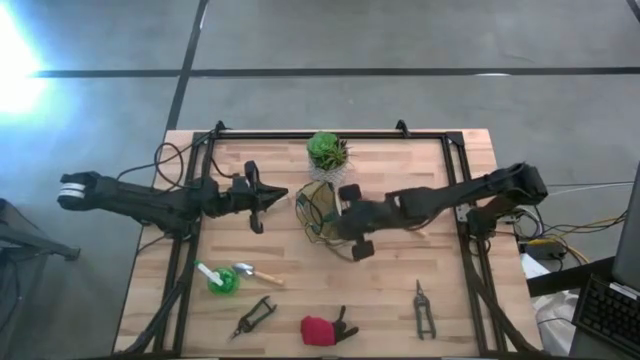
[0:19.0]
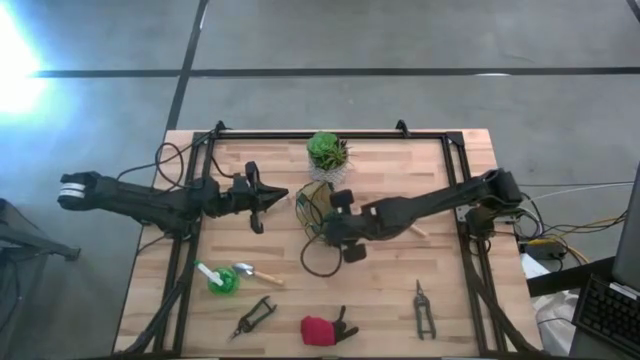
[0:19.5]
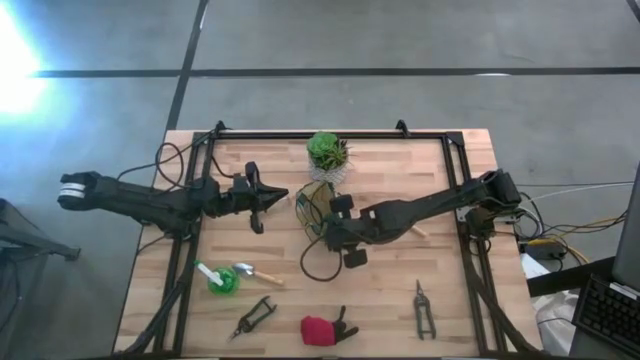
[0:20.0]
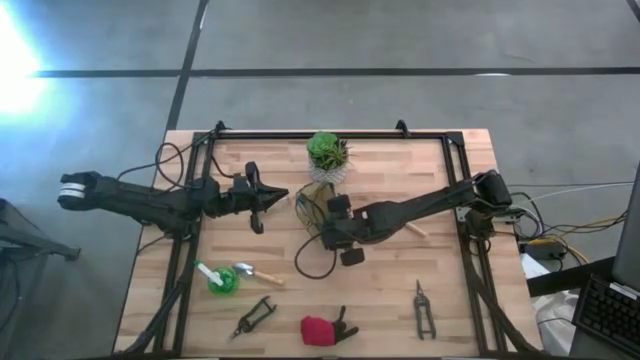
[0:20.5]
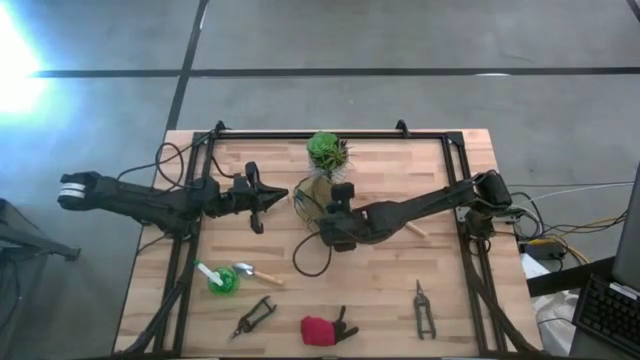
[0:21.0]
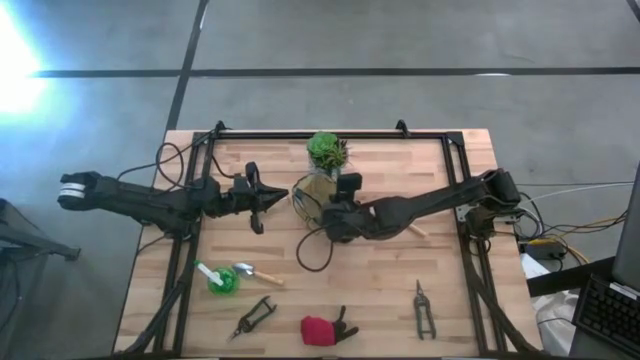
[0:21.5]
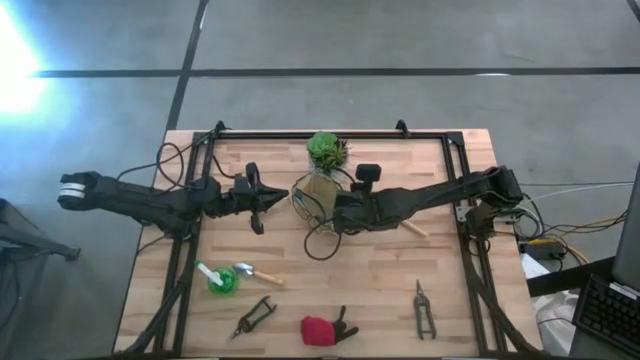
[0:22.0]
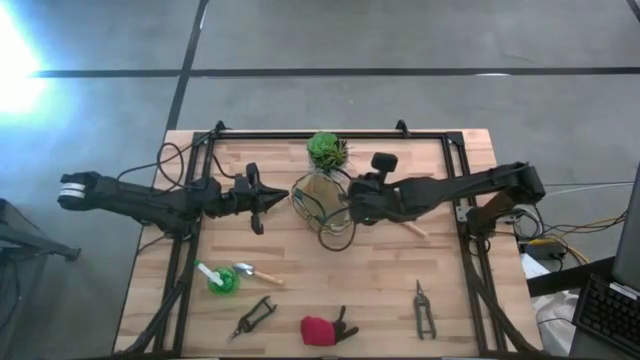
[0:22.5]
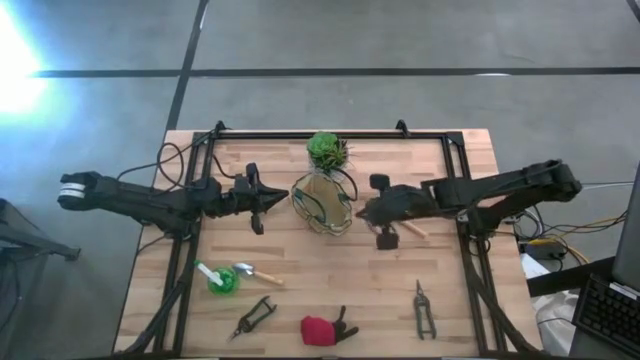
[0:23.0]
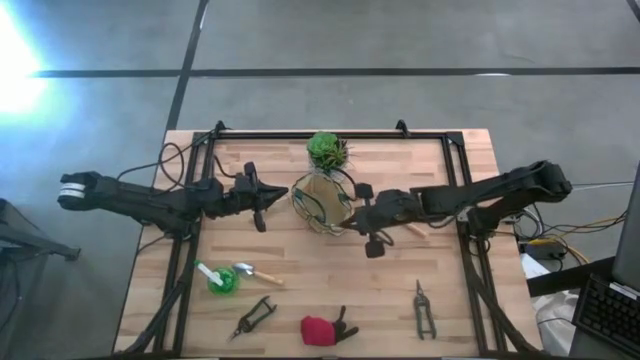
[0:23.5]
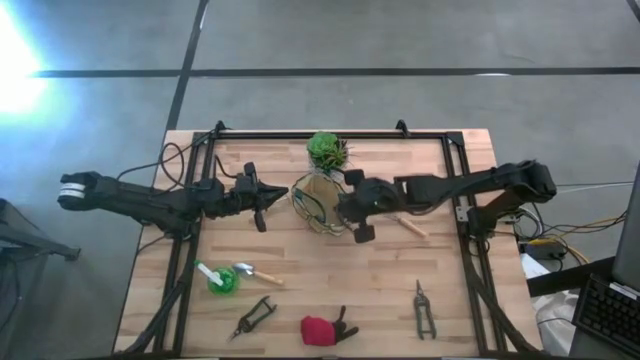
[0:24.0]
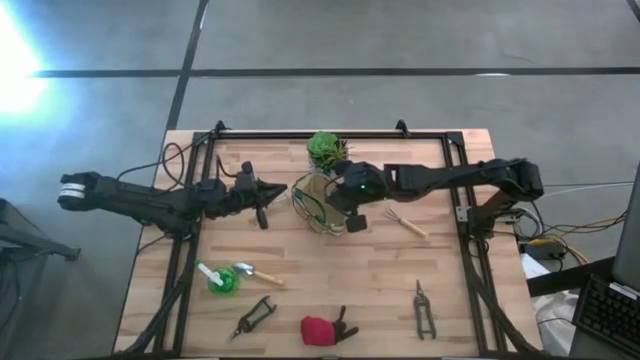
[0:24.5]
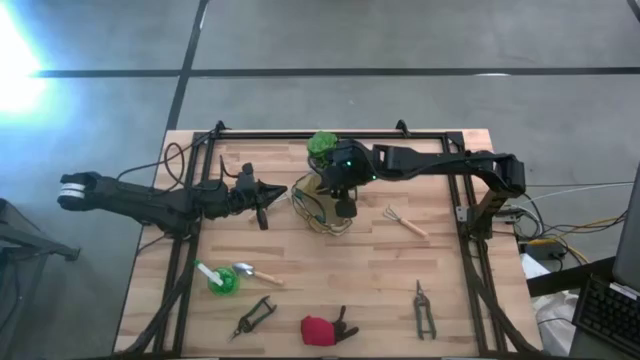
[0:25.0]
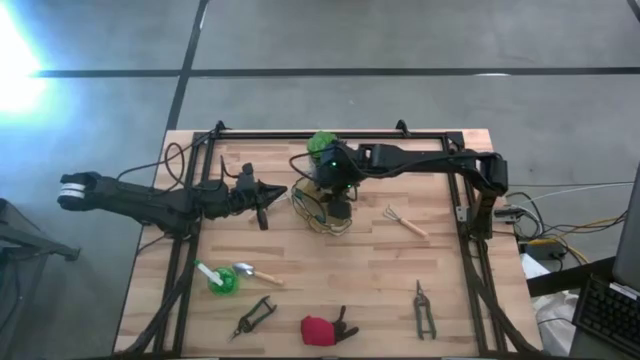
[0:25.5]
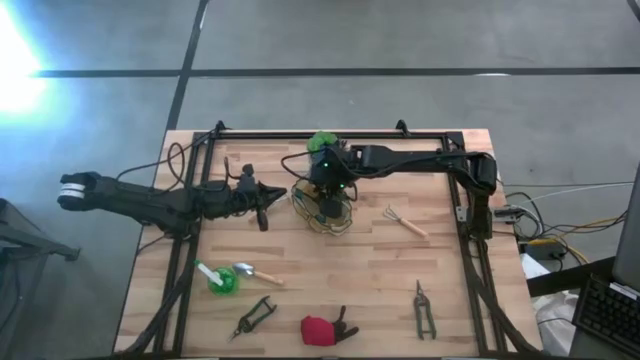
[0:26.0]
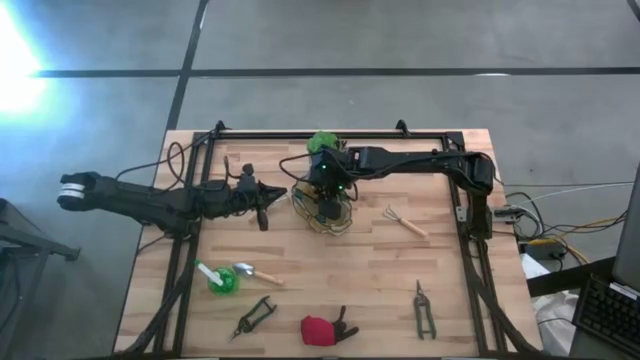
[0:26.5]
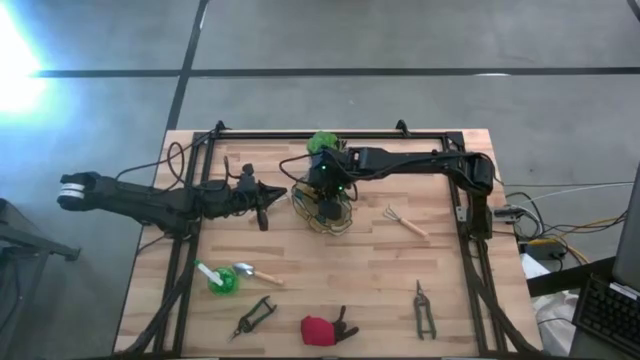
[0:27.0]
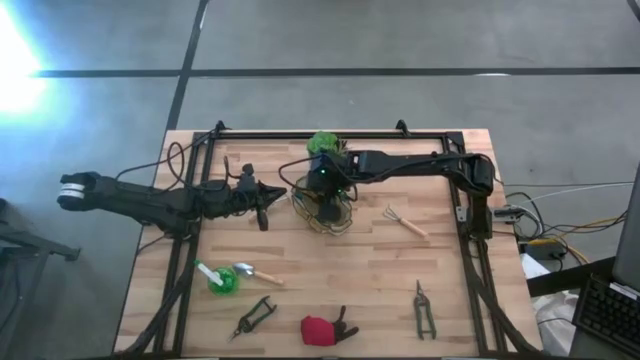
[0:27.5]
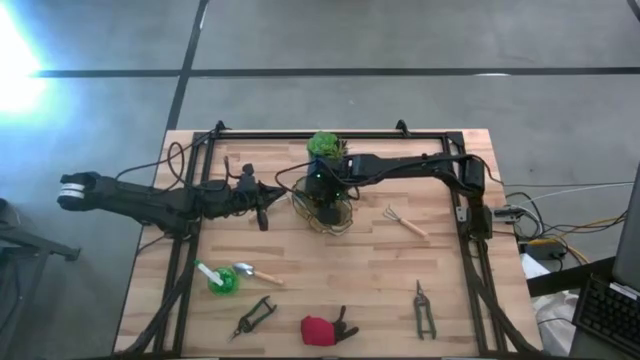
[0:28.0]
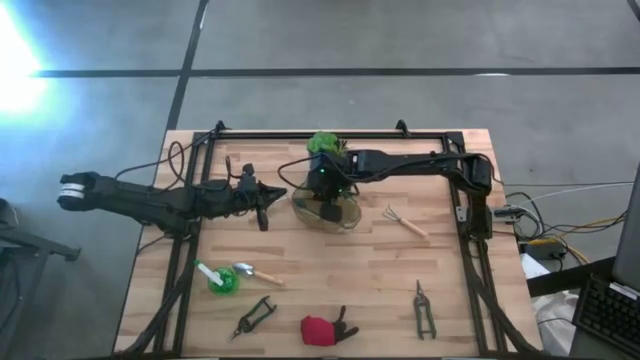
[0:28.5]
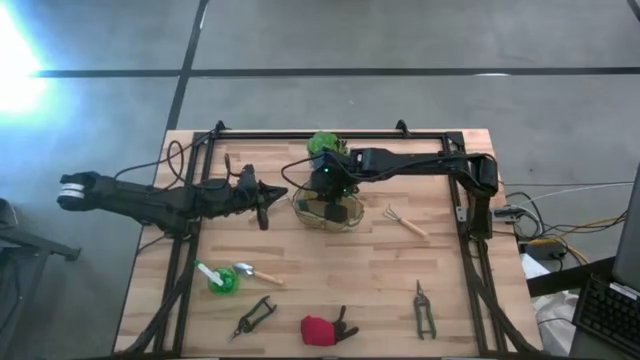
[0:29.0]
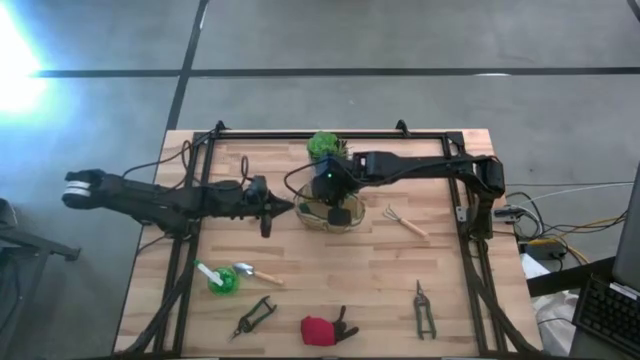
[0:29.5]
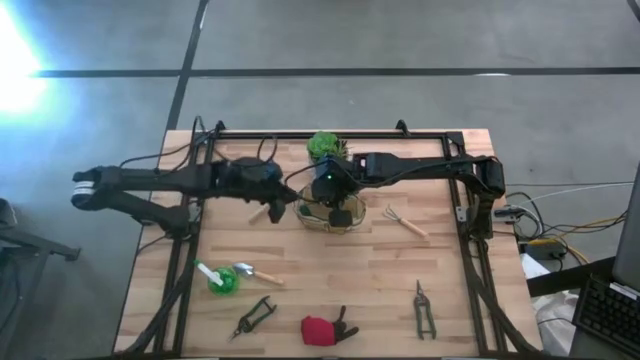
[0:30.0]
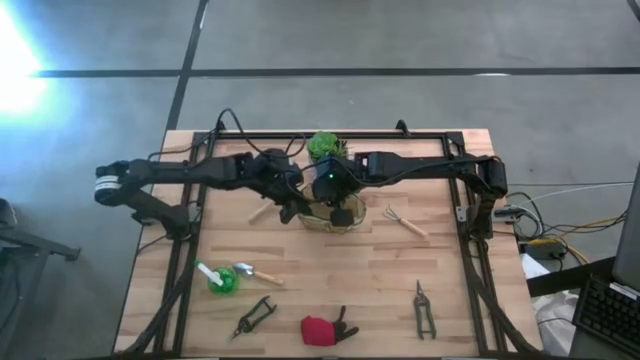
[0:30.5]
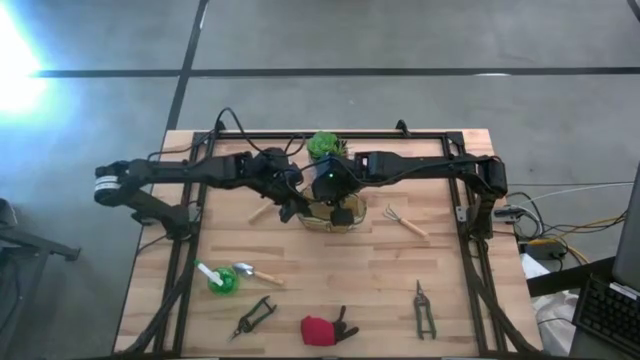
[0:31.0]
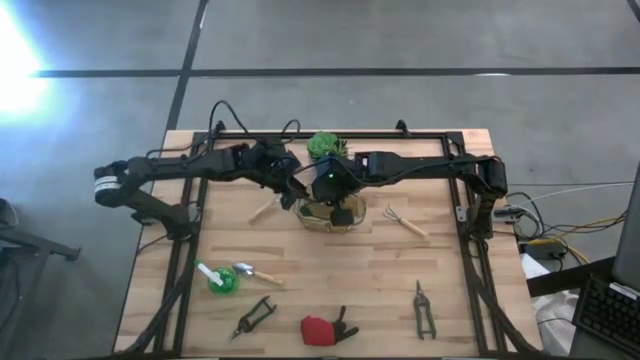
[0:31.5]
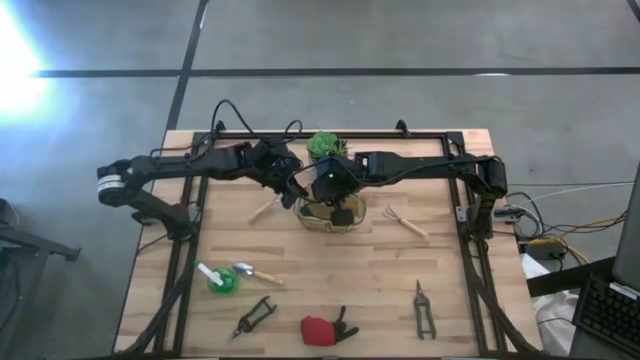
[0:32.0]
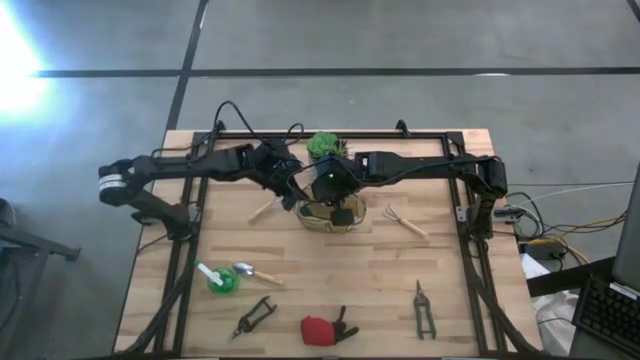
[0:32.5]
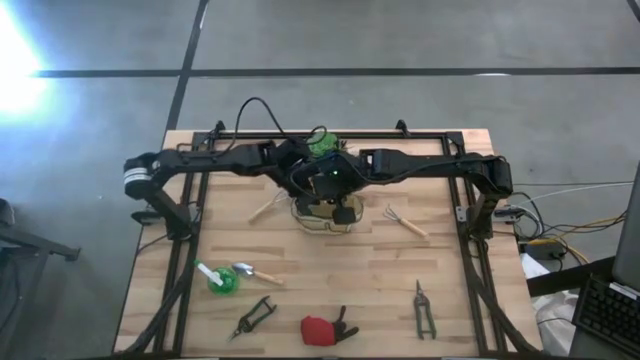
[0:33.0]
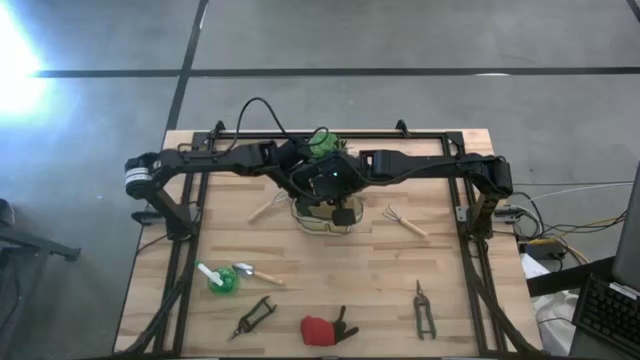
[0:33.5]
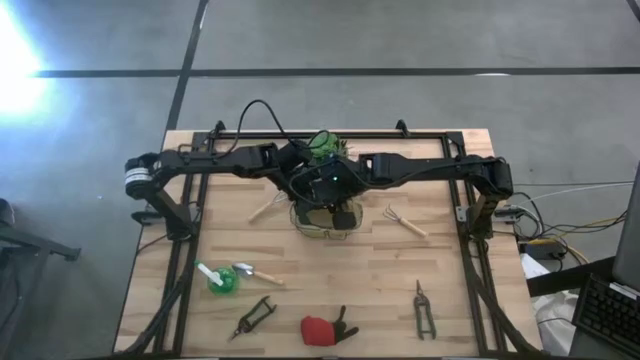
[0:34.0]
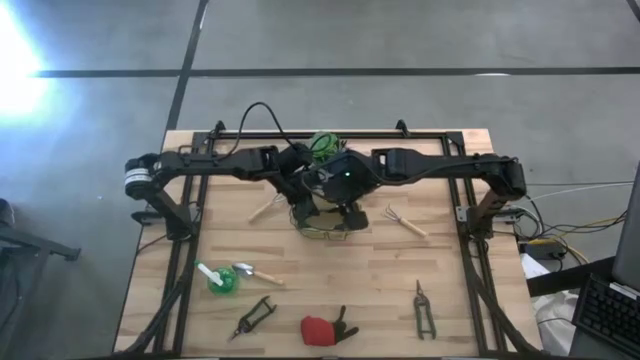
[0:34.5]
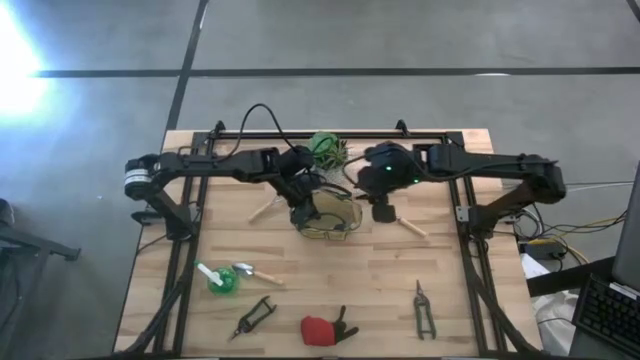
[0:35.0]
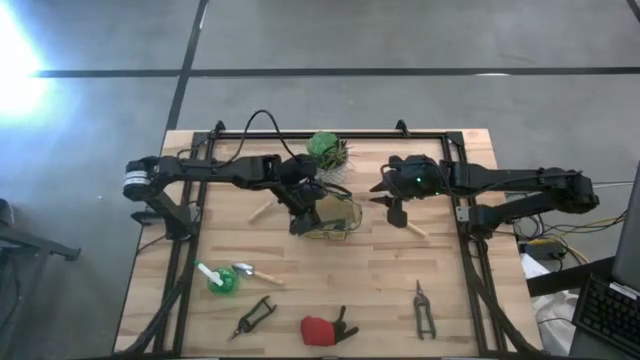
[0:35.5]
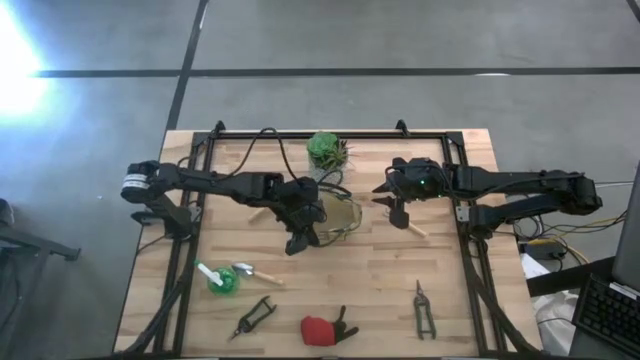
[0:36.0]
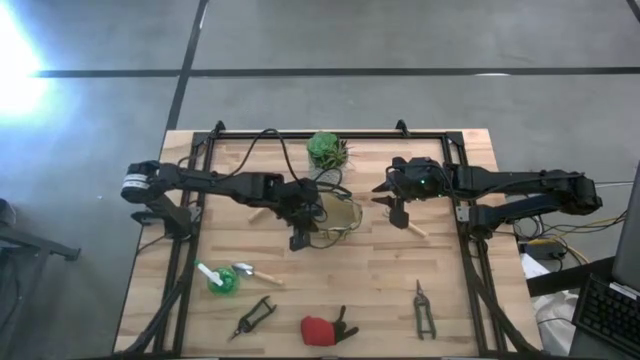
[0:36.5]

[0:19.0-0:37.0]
Task: Pick & Place Garden tools in Gardening bag
Prepare the gardening bag

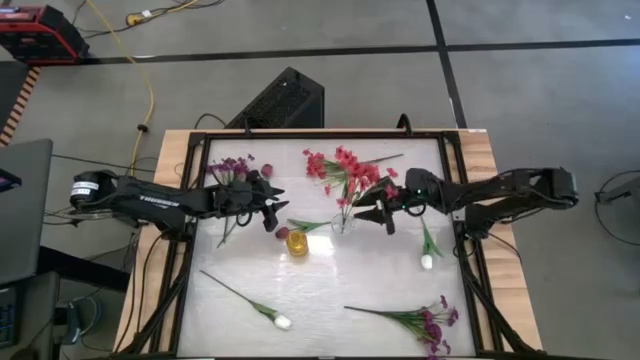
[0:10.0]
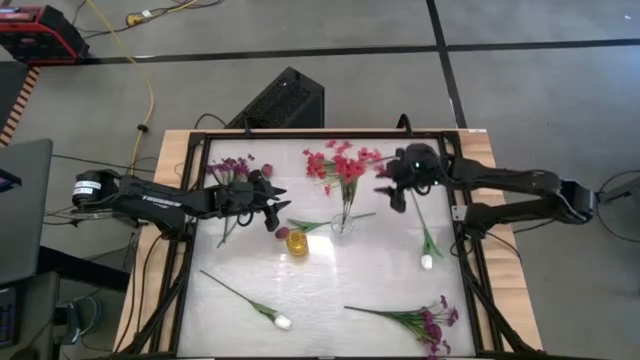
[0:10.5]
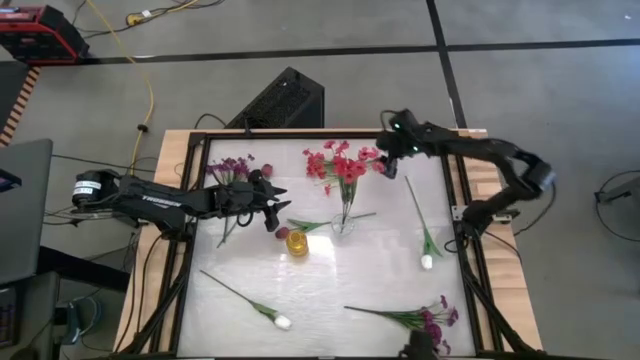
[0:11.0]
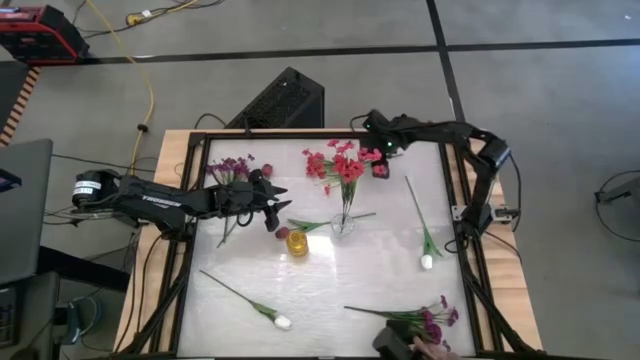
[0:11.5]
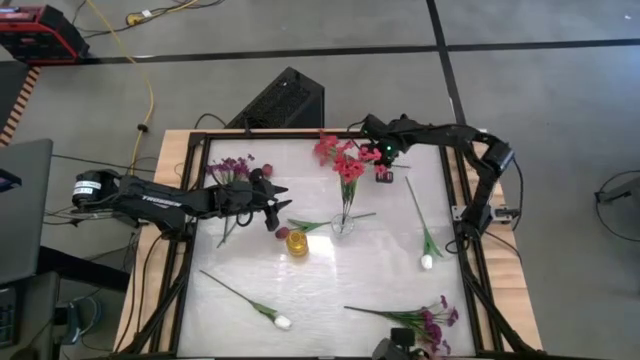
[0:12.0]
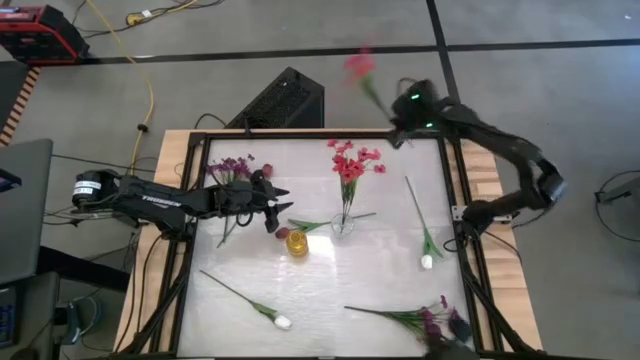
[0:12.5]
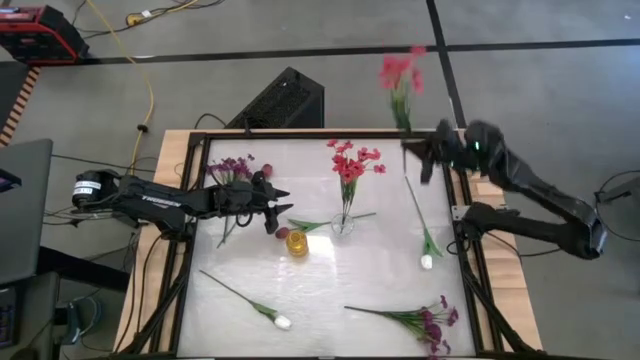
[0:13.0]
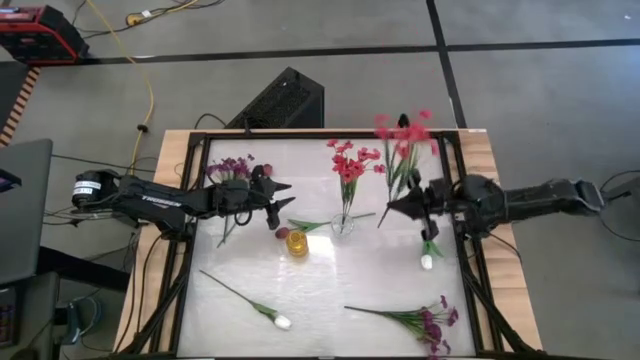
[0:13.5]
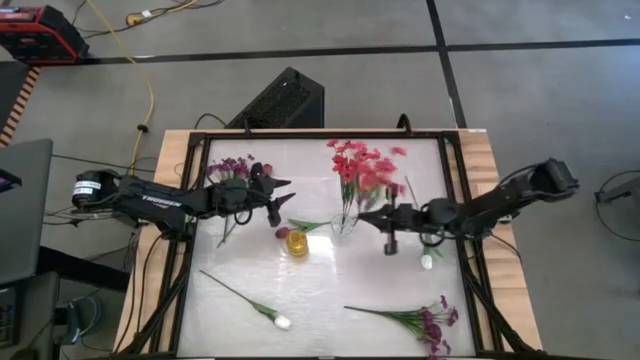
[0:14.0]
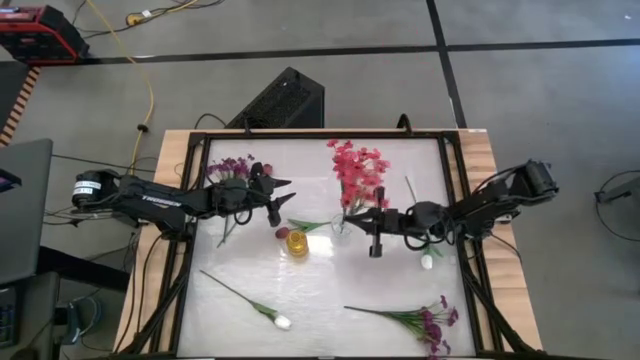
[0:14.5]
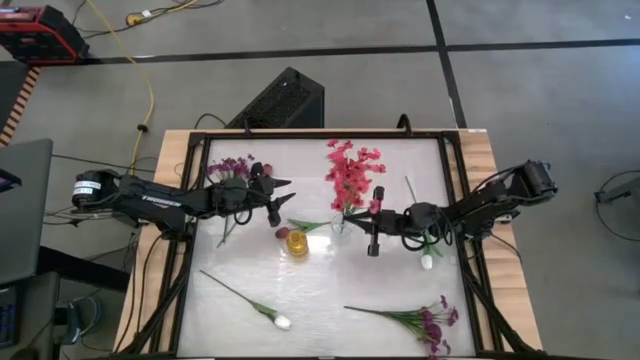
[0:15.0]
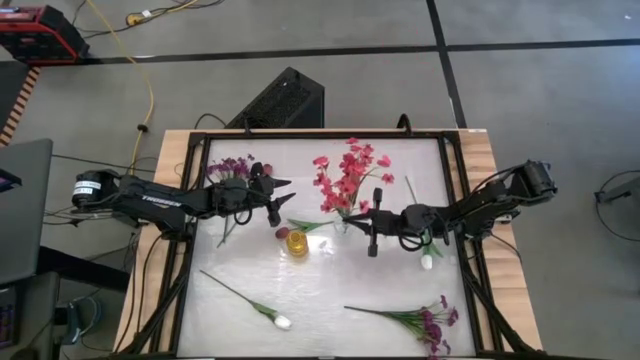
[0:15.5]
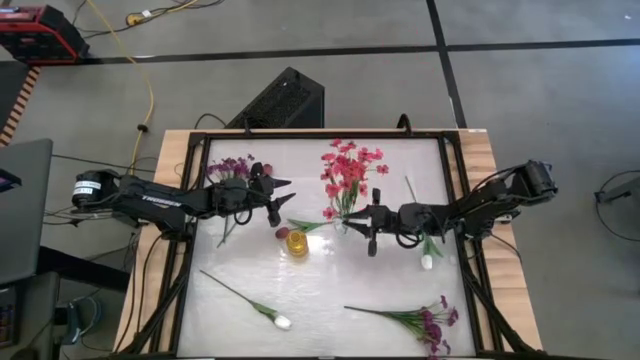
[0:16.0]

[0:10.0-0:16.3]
Task: Sort flowers into vase by color
Put the red flowers into the transparent vase
